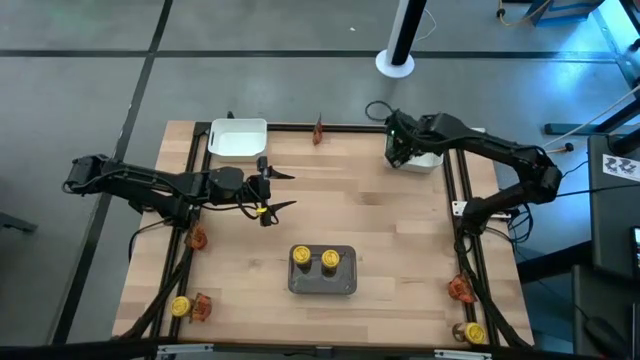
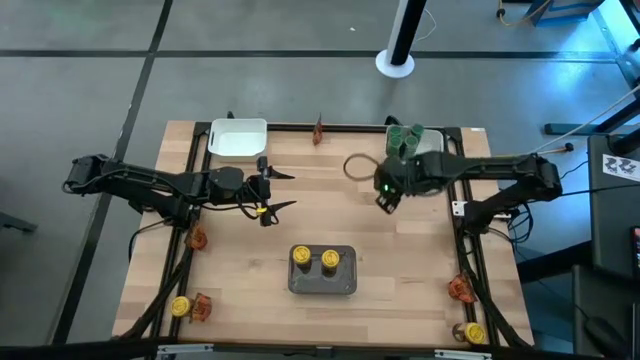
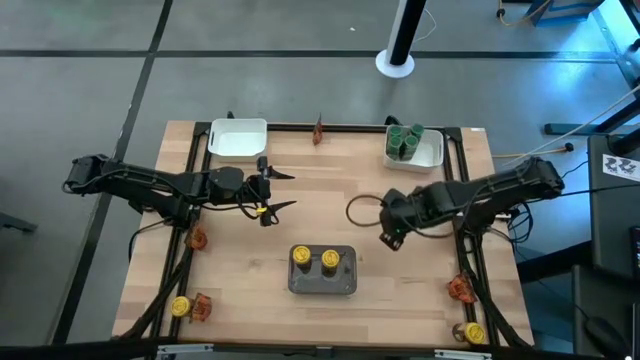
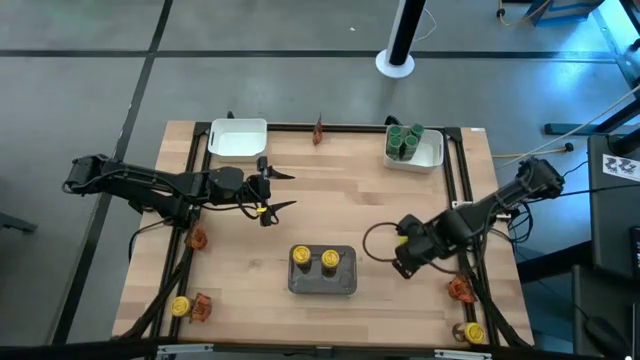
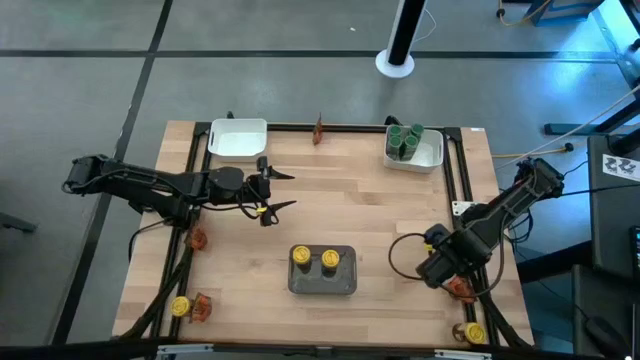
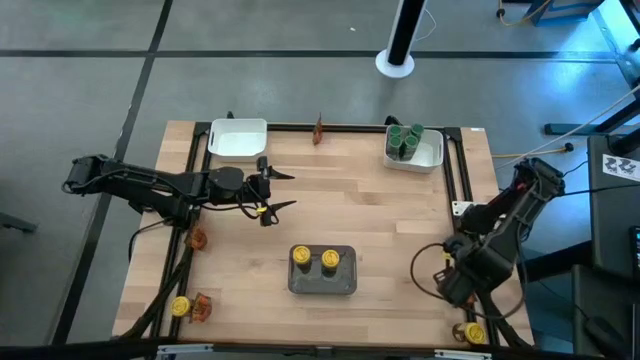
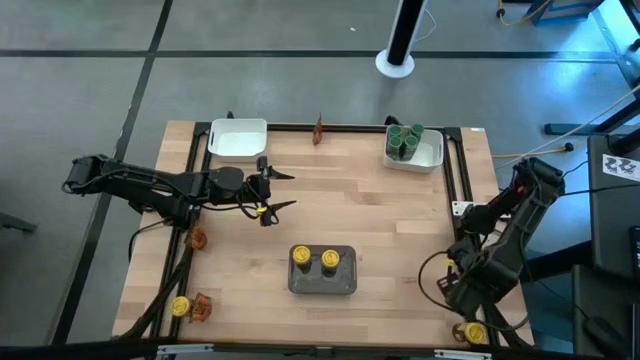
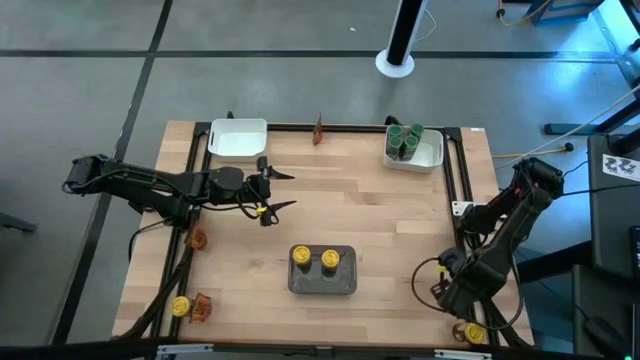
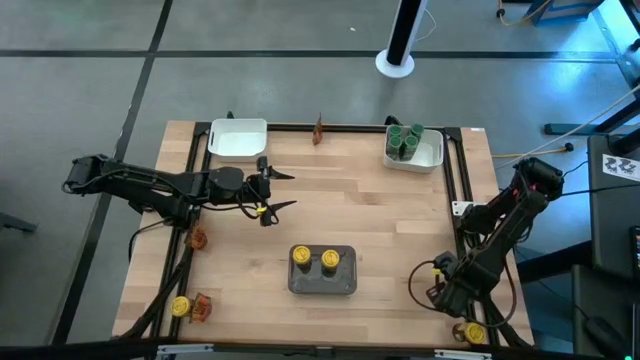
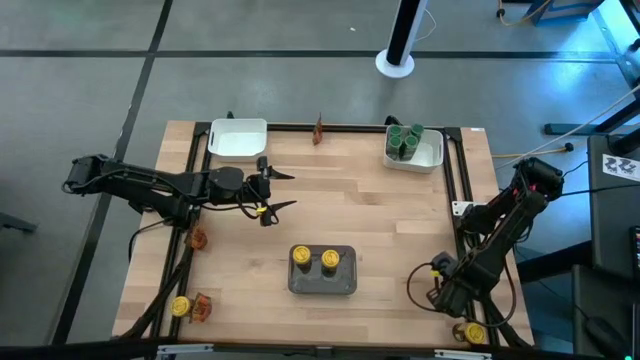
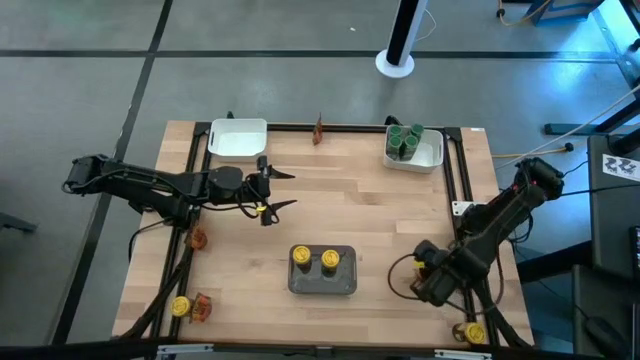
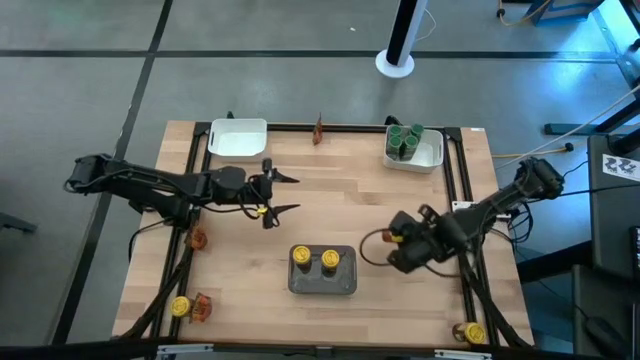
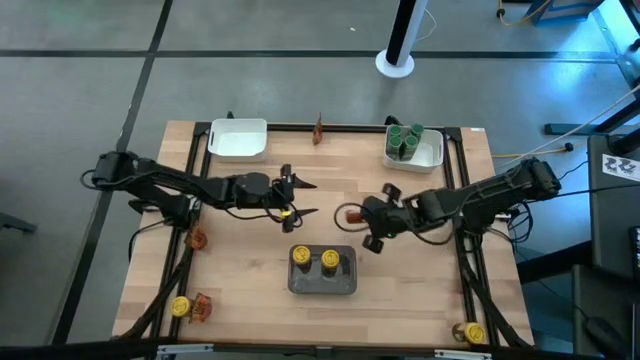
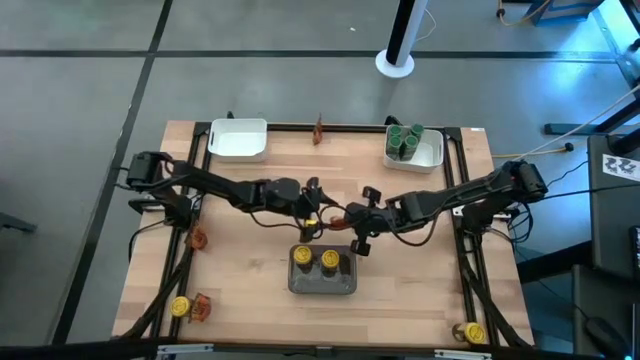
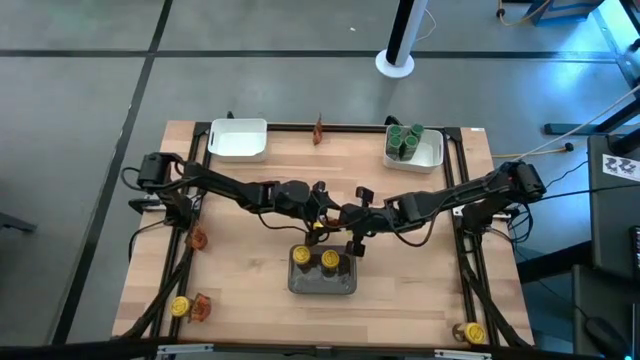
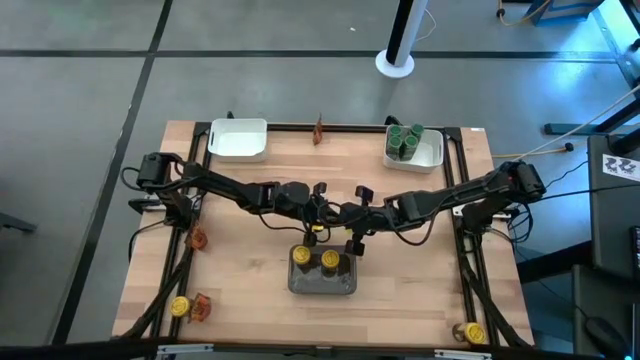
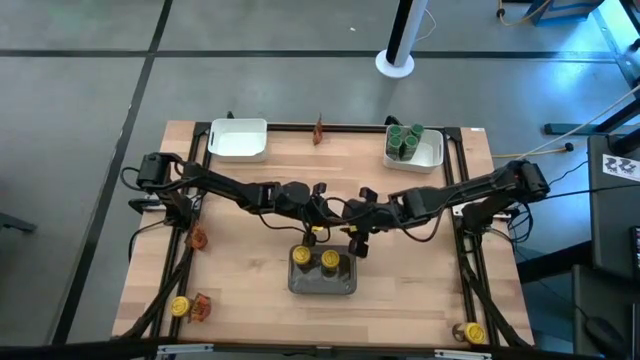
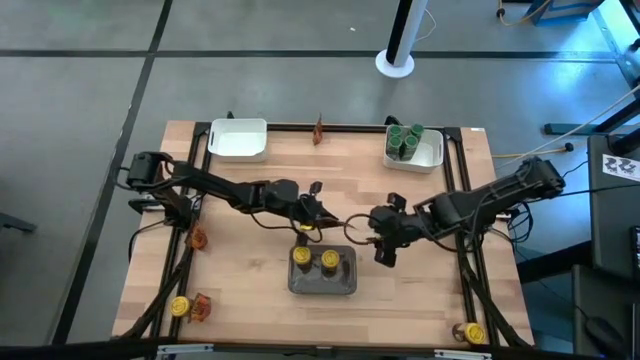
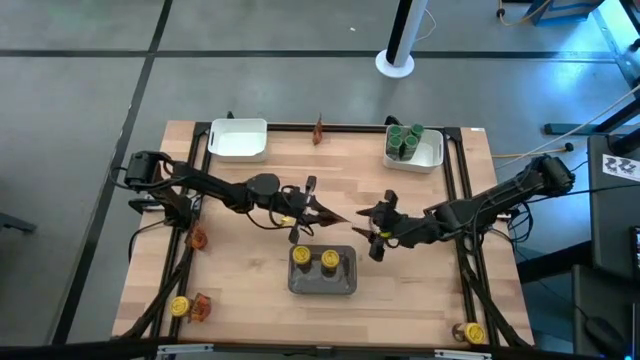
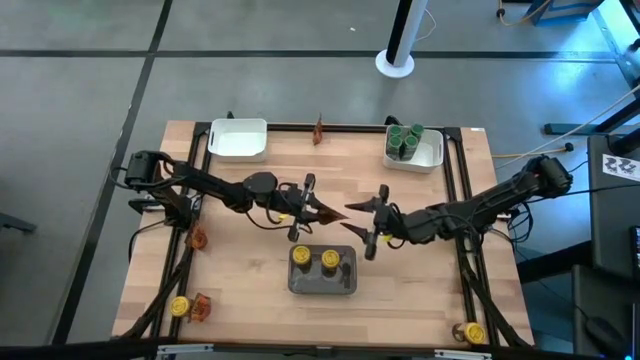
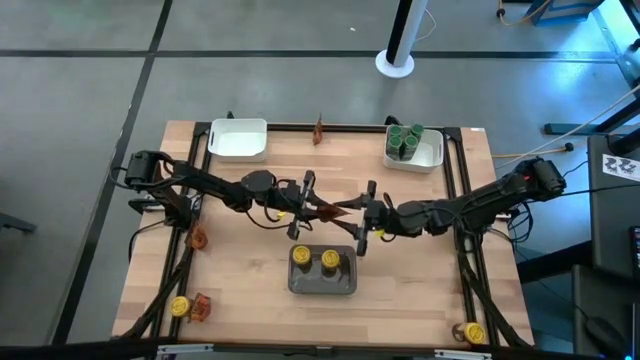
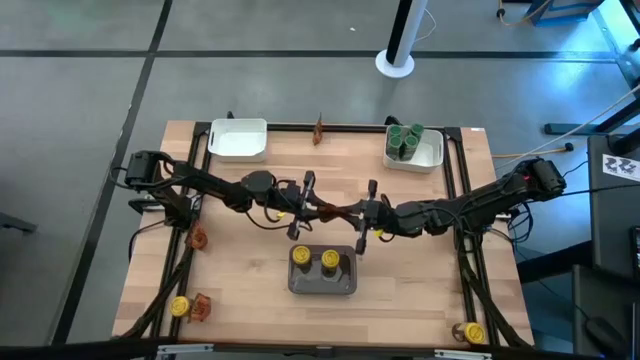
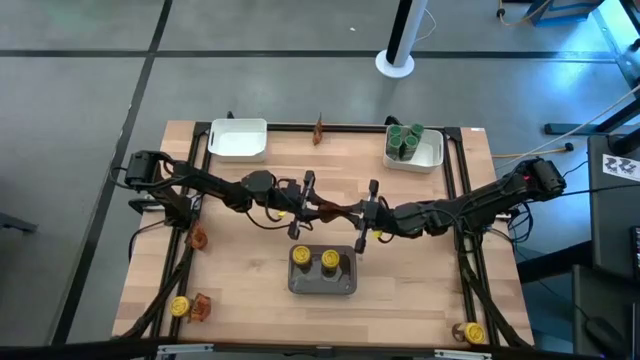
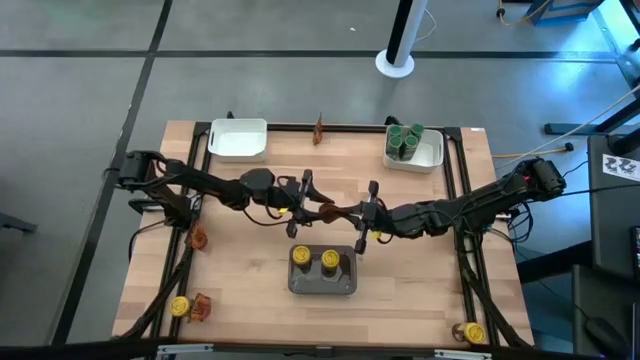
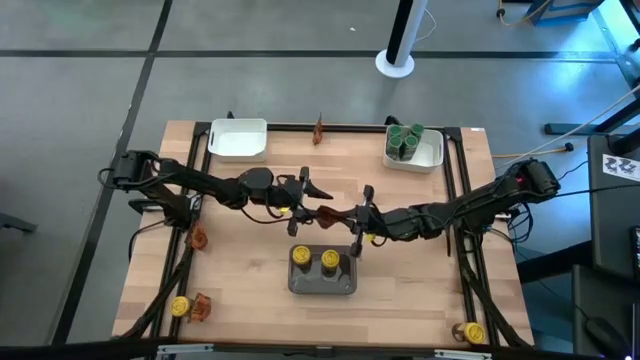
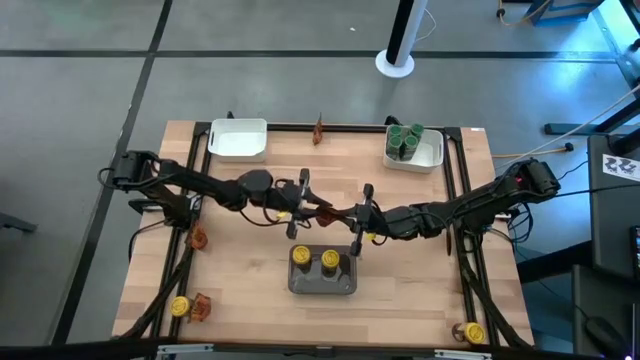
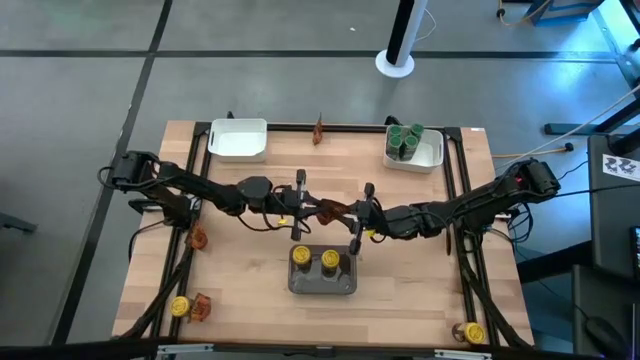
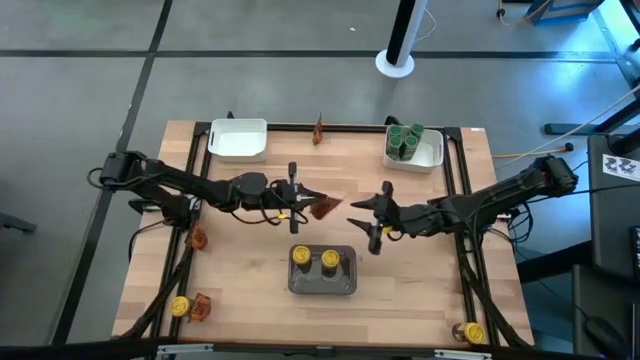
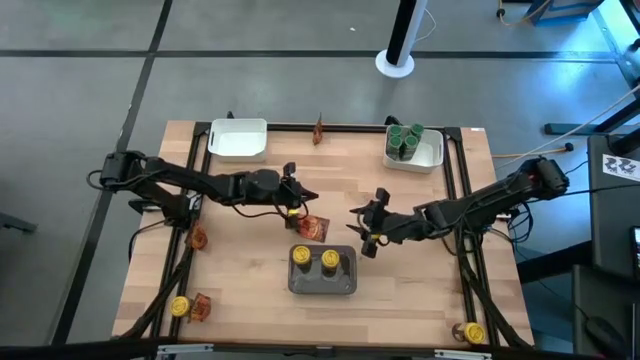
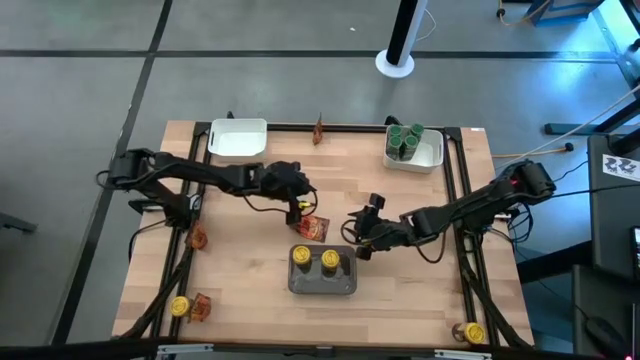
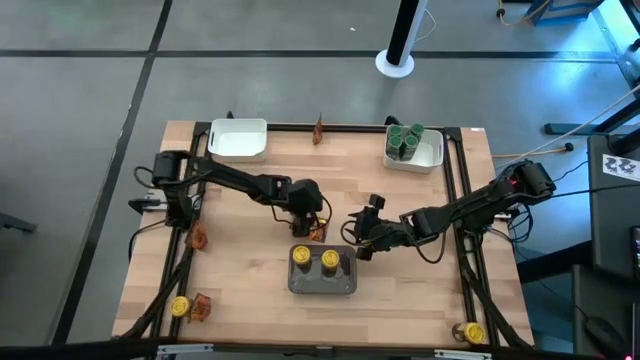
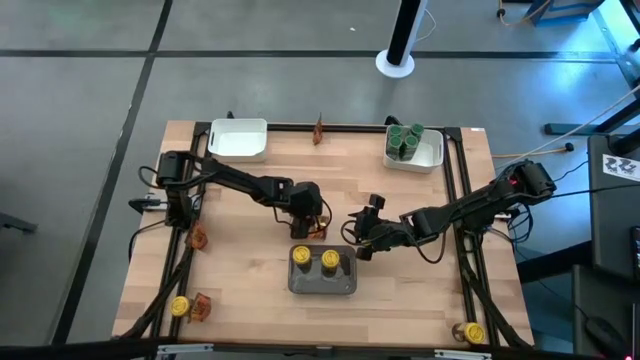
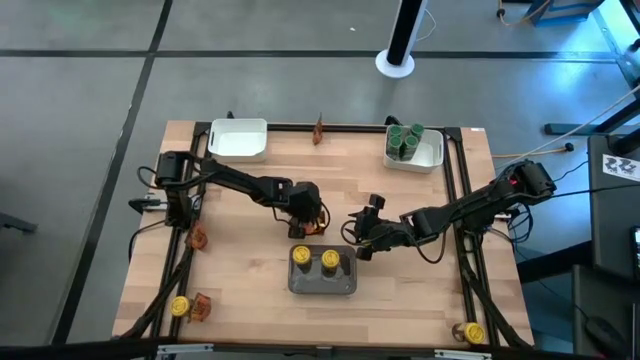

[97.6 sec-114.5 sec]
Task: Sort spices by type
Put the middle right orange seasoning bag into the left white bin

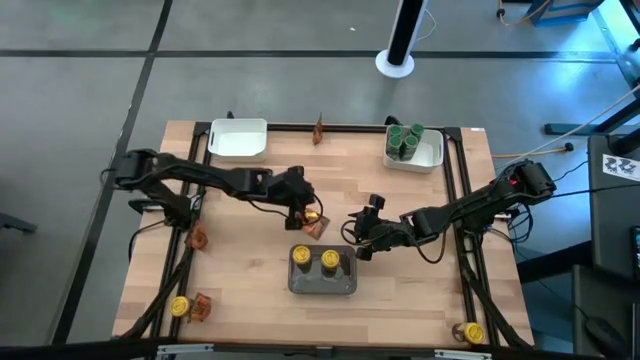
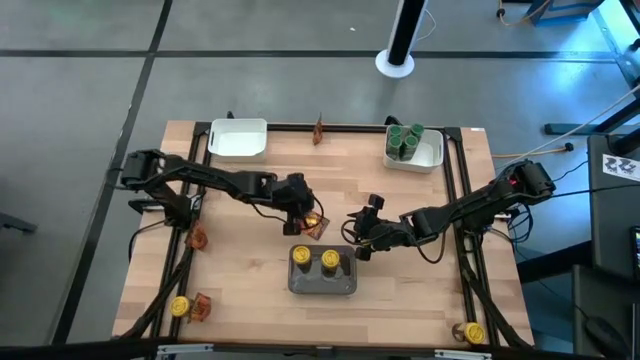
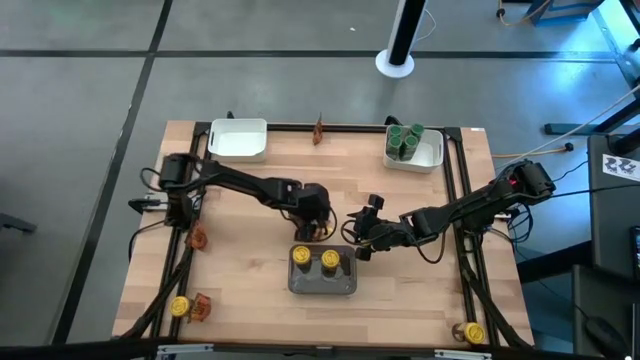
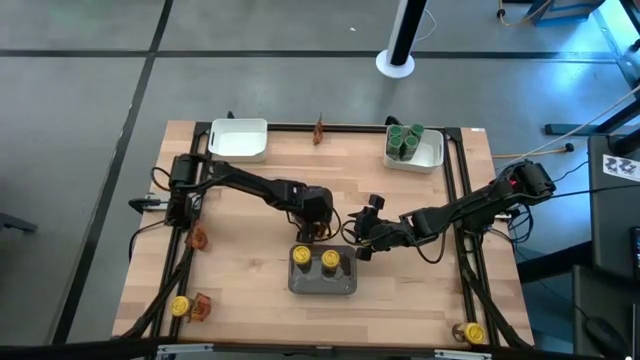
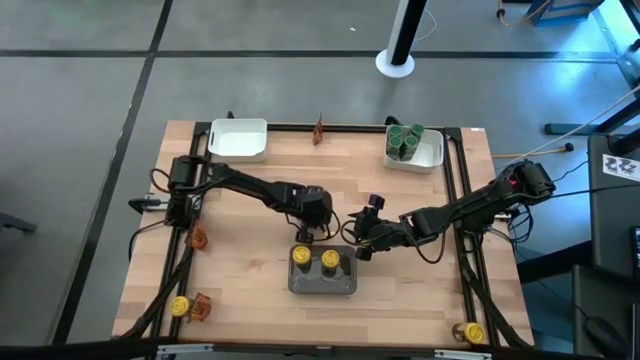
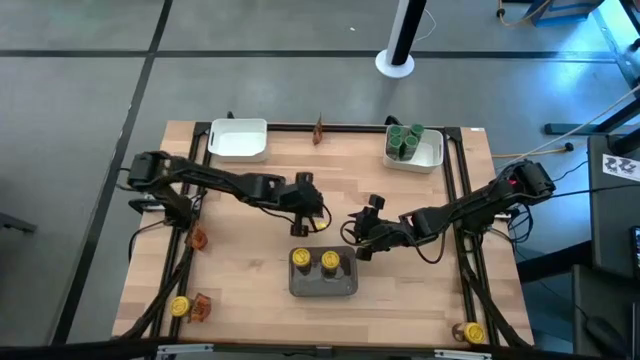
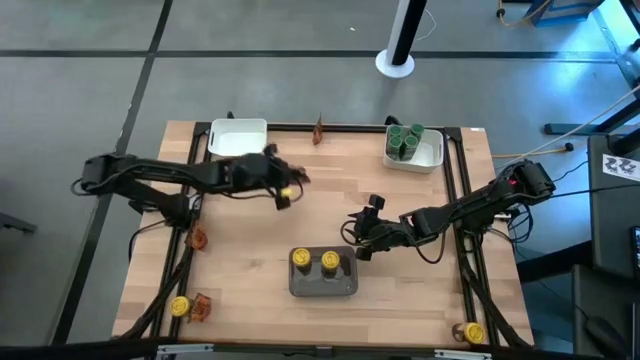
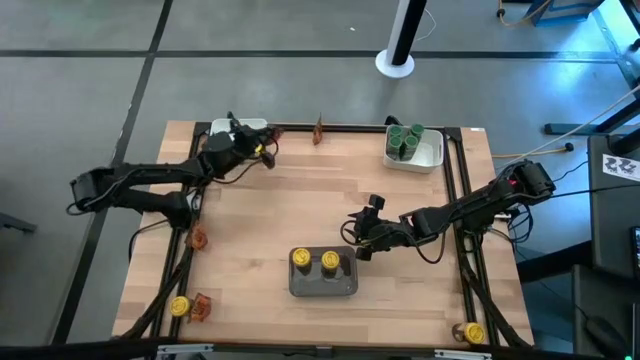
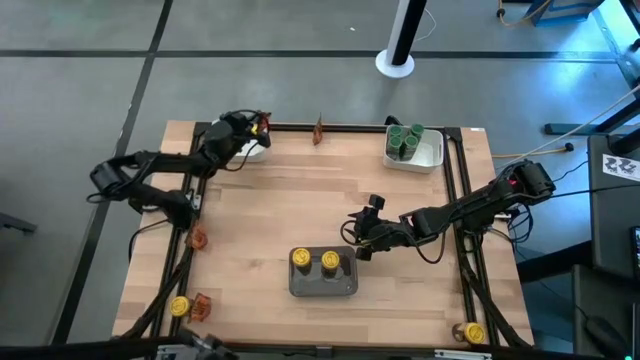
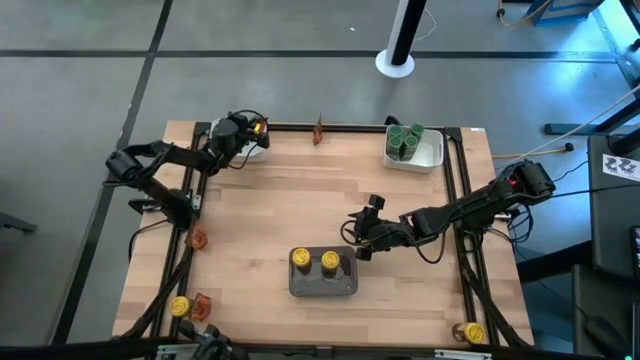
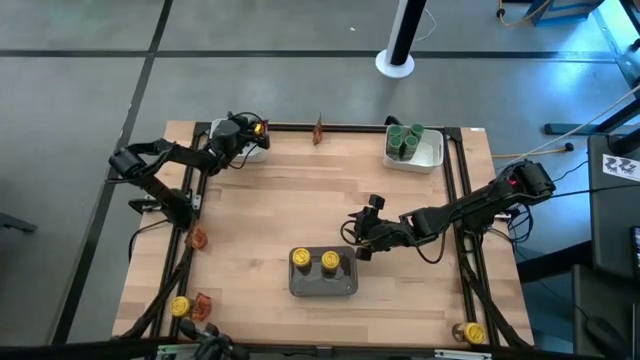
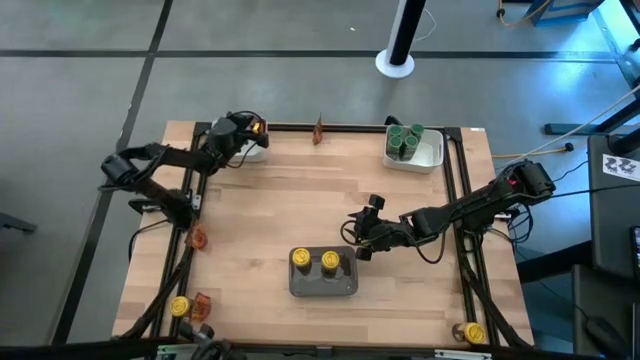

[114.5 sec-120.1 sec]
Put the middle right orange seasoning bag into the left white bin
